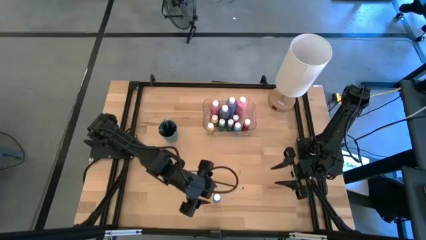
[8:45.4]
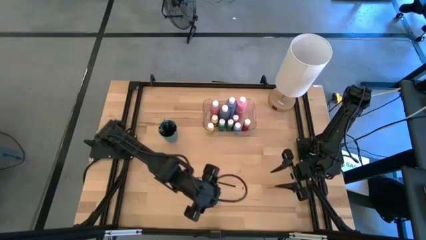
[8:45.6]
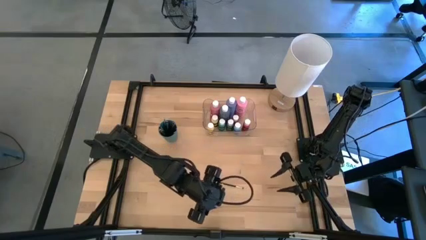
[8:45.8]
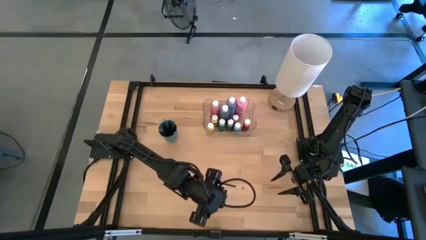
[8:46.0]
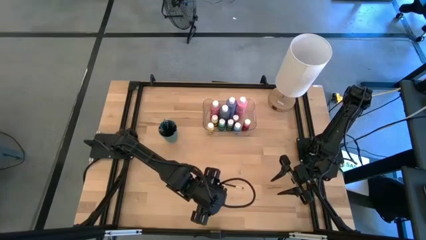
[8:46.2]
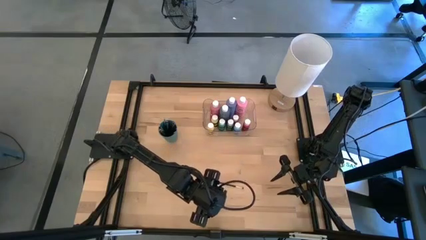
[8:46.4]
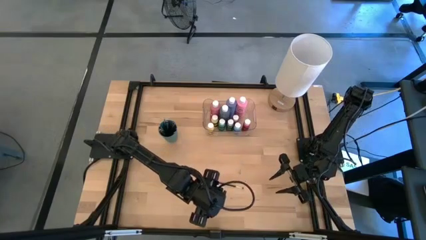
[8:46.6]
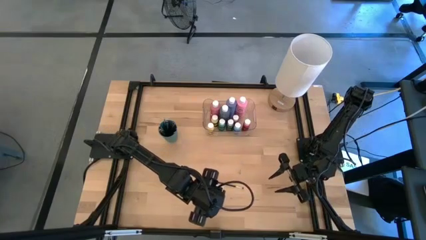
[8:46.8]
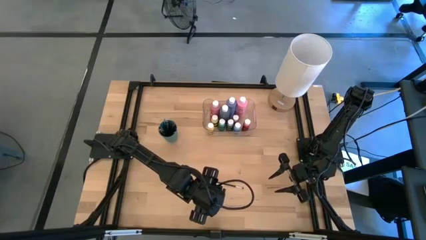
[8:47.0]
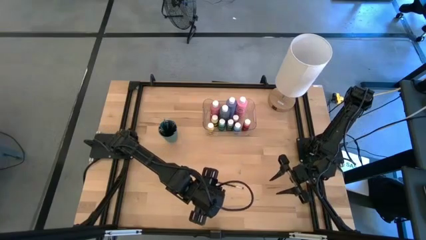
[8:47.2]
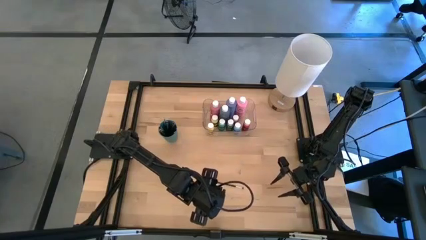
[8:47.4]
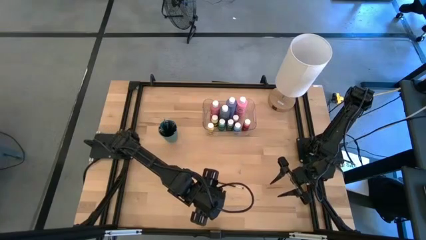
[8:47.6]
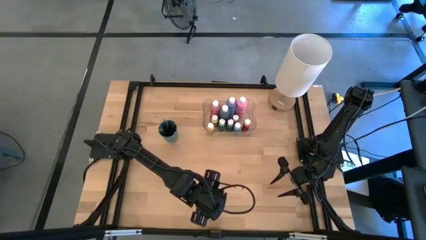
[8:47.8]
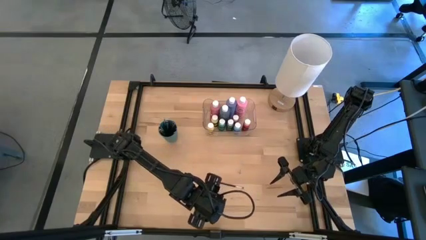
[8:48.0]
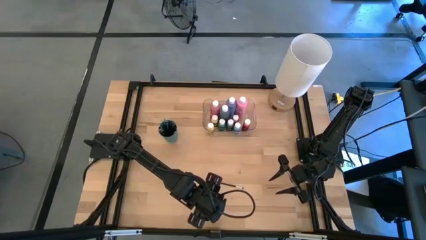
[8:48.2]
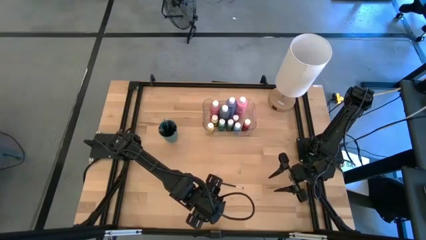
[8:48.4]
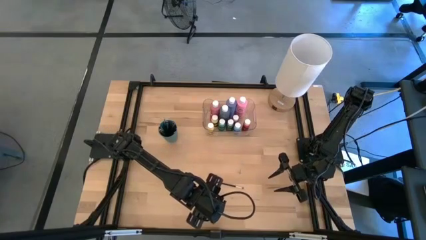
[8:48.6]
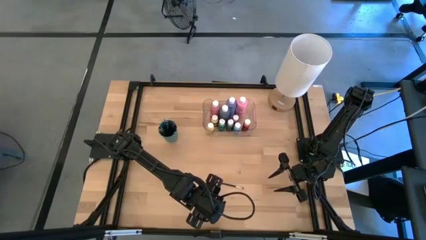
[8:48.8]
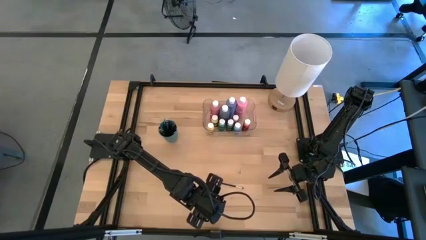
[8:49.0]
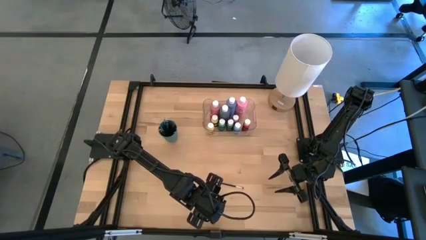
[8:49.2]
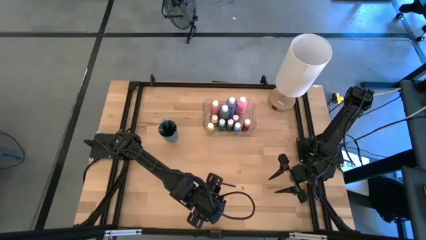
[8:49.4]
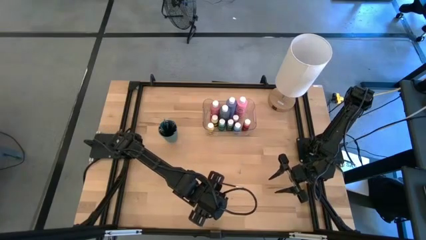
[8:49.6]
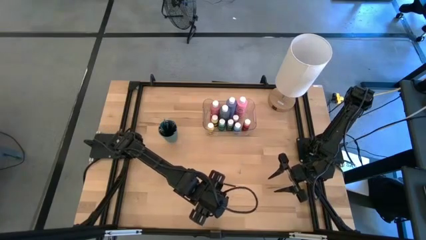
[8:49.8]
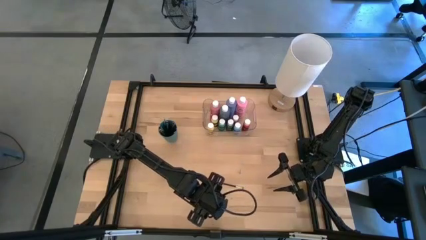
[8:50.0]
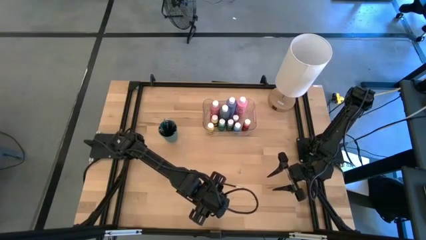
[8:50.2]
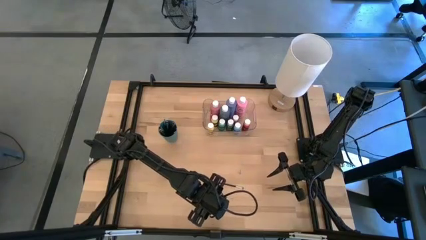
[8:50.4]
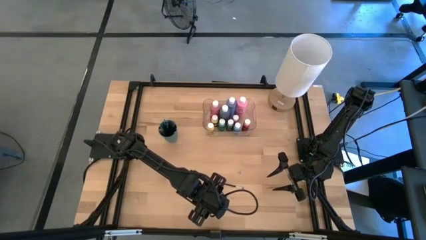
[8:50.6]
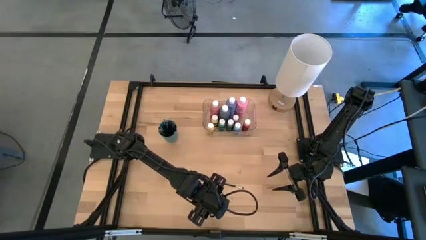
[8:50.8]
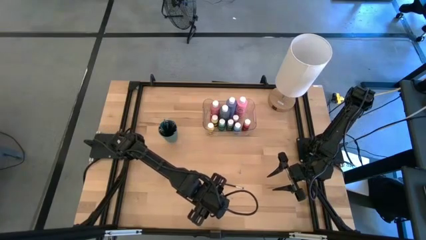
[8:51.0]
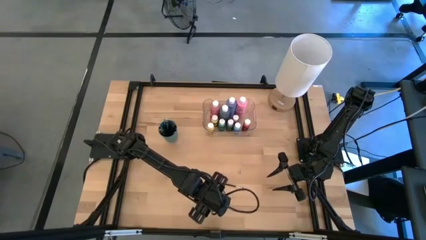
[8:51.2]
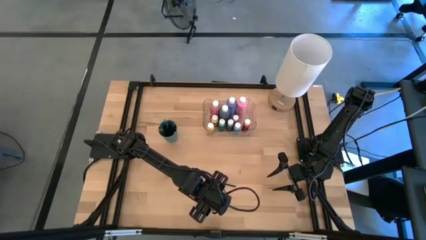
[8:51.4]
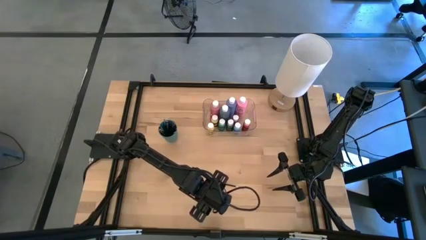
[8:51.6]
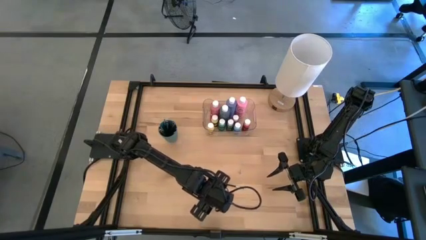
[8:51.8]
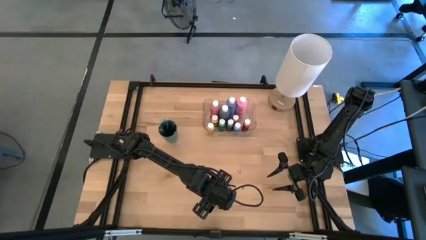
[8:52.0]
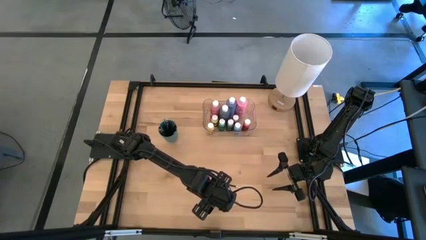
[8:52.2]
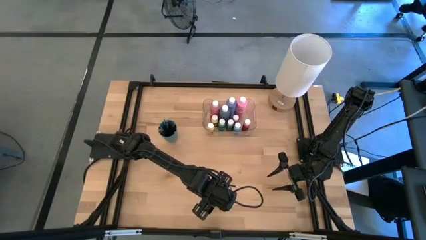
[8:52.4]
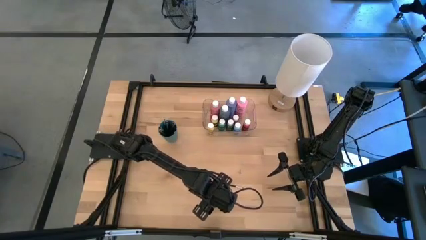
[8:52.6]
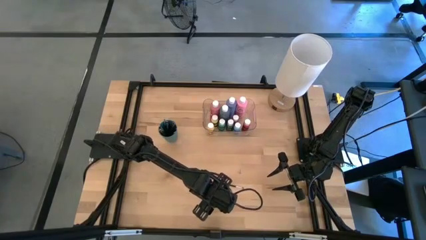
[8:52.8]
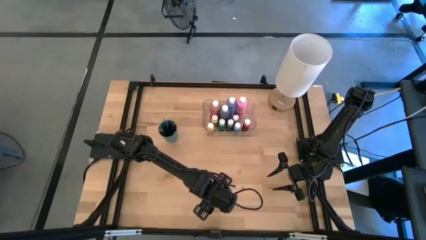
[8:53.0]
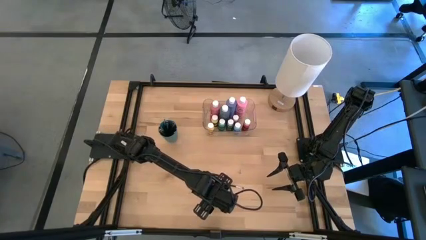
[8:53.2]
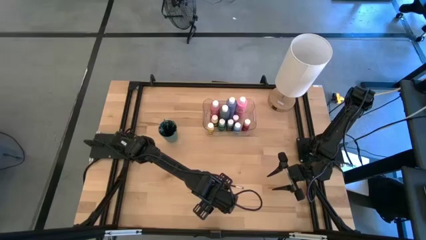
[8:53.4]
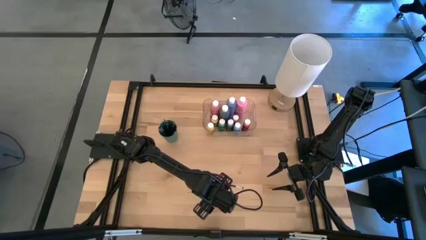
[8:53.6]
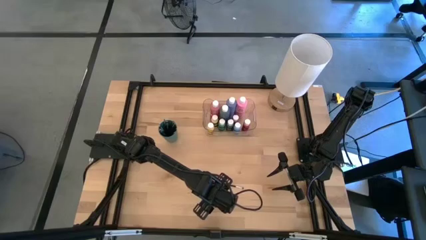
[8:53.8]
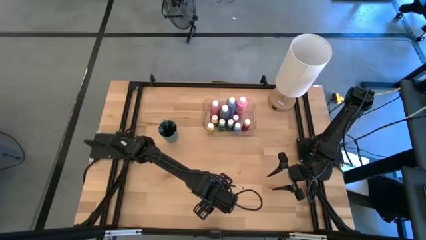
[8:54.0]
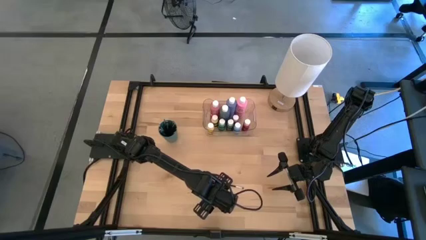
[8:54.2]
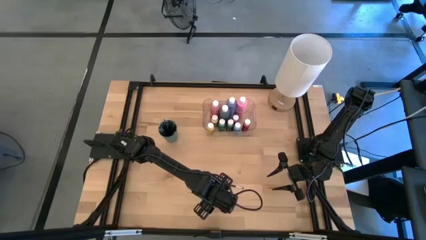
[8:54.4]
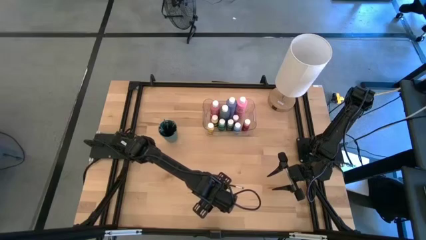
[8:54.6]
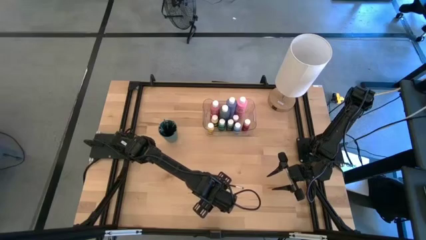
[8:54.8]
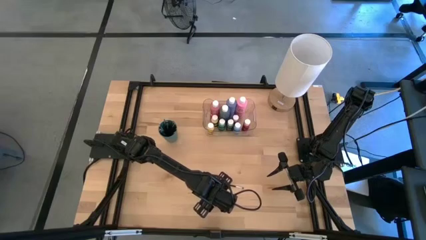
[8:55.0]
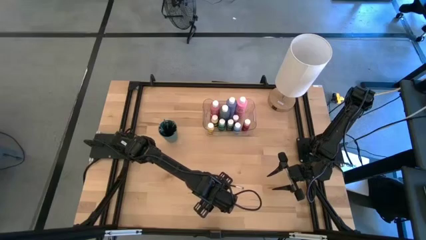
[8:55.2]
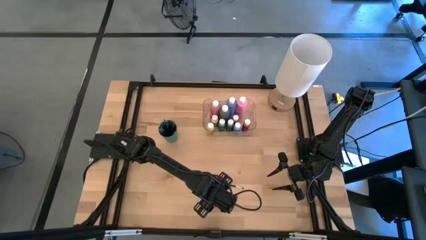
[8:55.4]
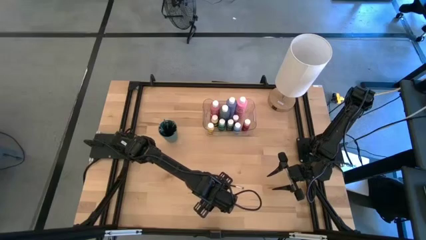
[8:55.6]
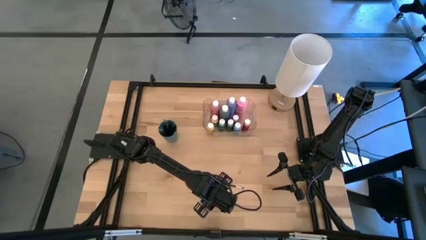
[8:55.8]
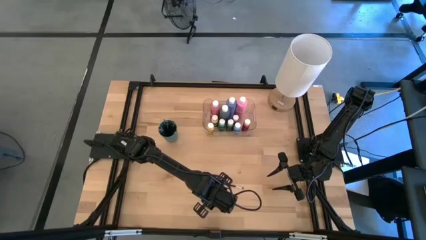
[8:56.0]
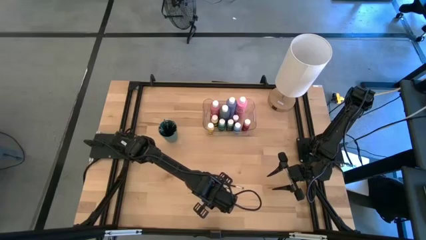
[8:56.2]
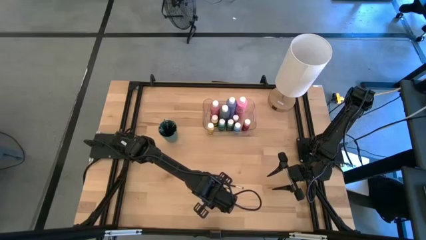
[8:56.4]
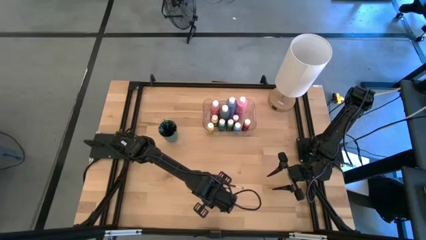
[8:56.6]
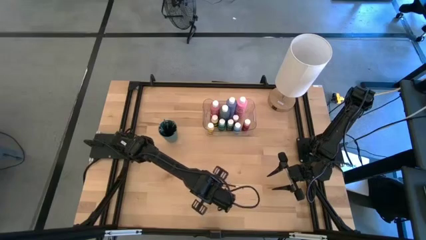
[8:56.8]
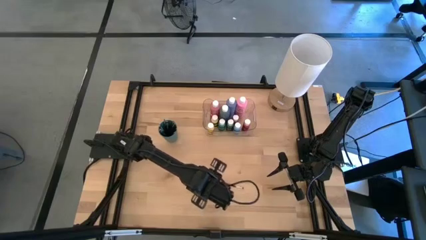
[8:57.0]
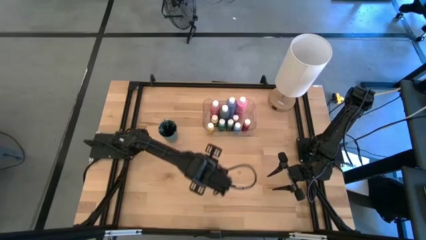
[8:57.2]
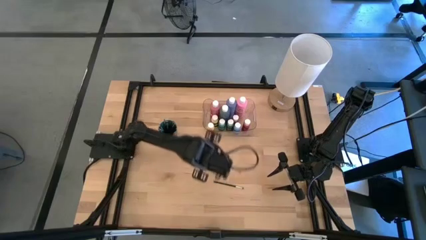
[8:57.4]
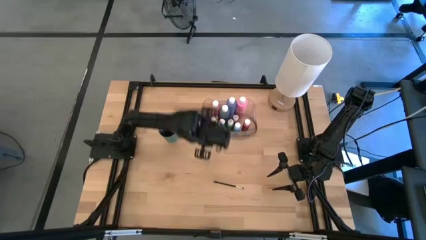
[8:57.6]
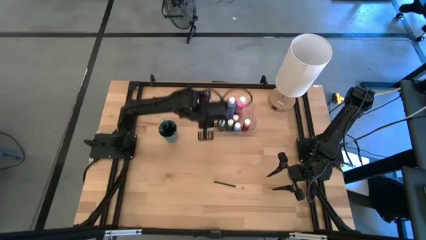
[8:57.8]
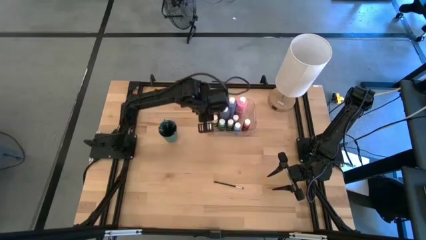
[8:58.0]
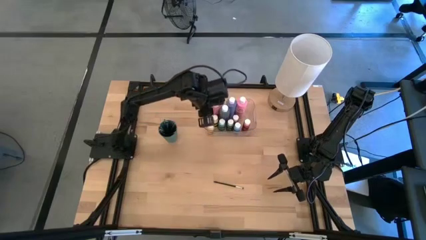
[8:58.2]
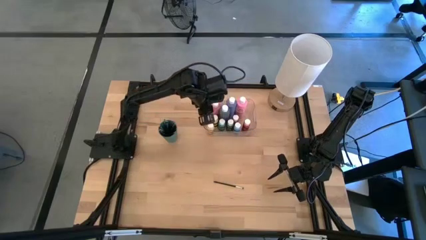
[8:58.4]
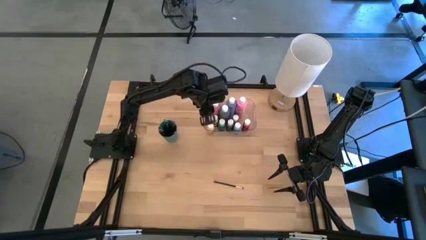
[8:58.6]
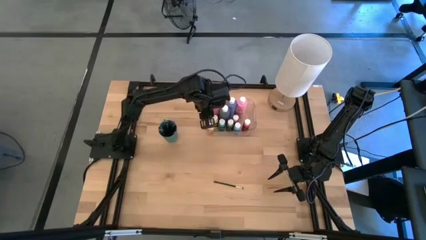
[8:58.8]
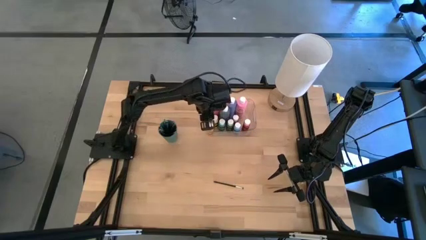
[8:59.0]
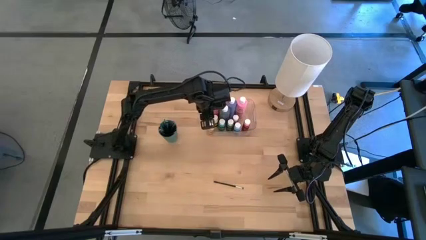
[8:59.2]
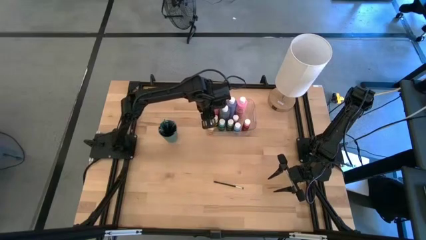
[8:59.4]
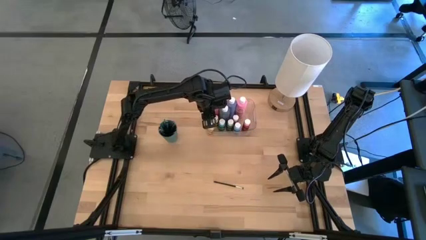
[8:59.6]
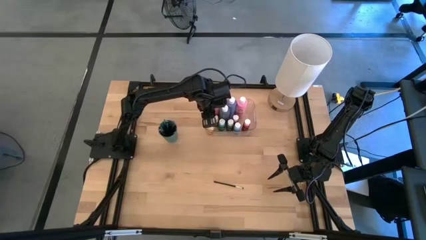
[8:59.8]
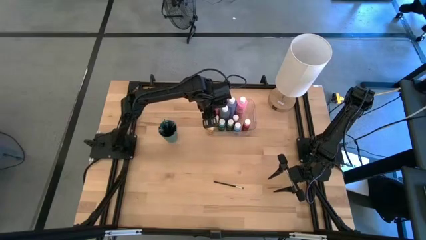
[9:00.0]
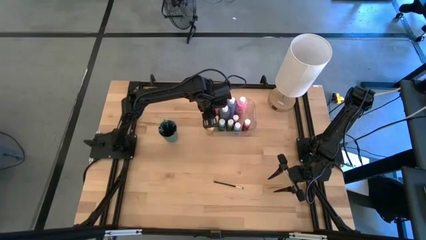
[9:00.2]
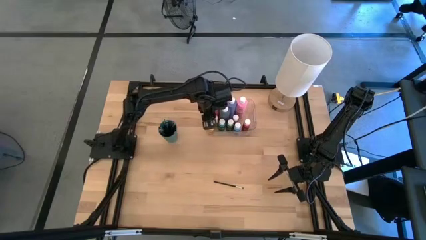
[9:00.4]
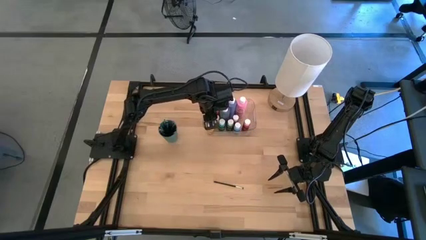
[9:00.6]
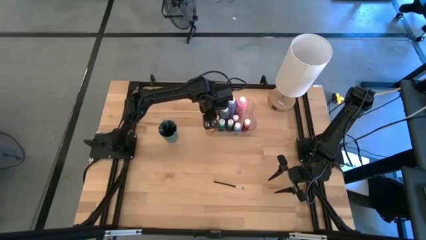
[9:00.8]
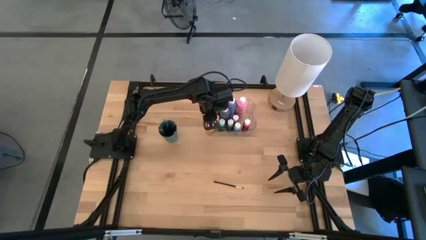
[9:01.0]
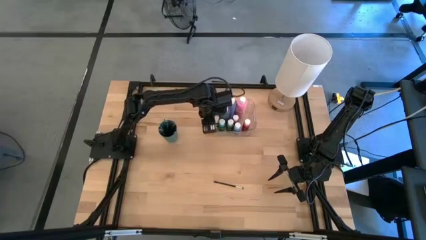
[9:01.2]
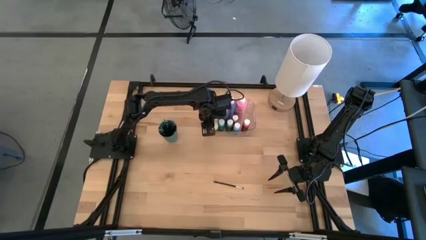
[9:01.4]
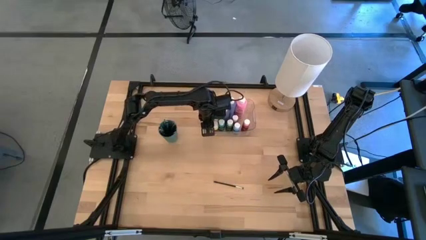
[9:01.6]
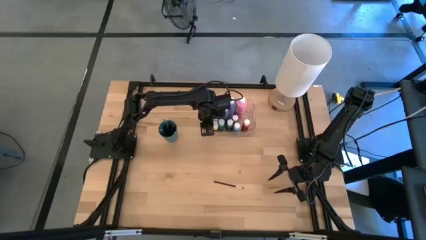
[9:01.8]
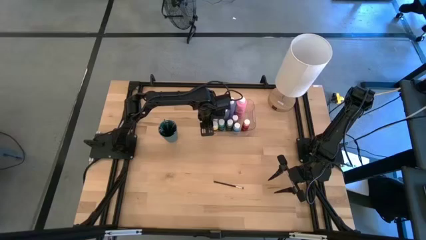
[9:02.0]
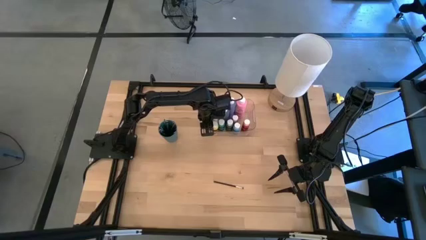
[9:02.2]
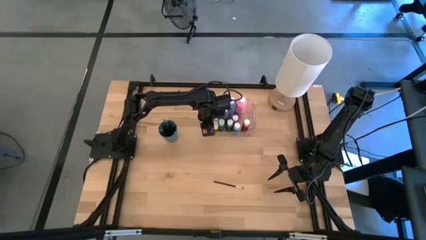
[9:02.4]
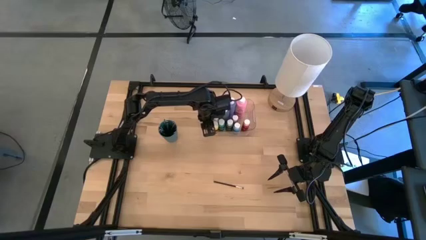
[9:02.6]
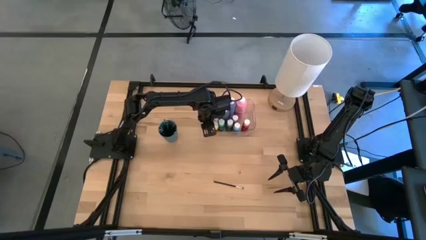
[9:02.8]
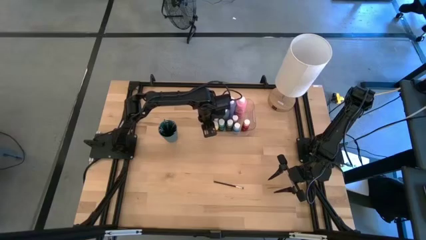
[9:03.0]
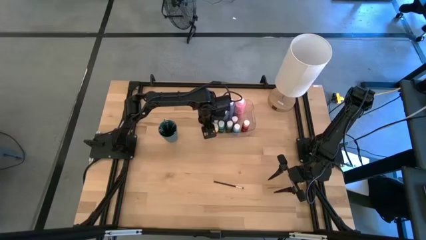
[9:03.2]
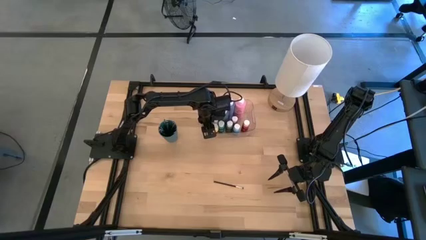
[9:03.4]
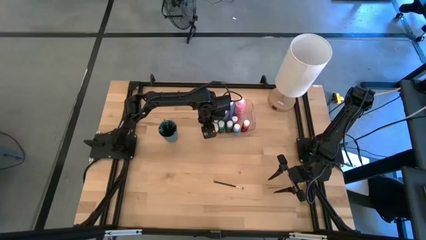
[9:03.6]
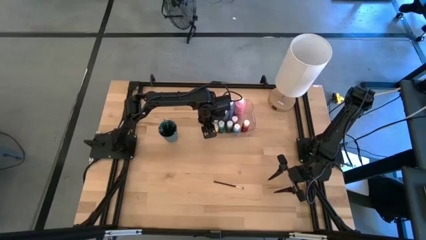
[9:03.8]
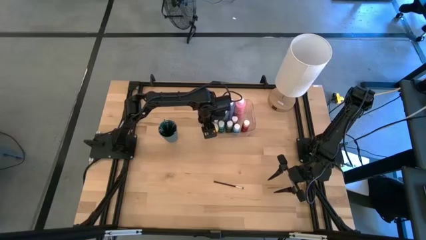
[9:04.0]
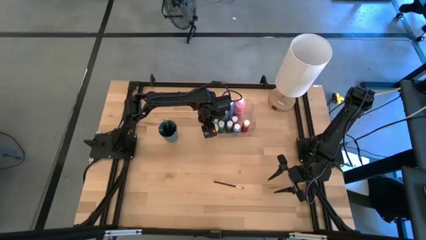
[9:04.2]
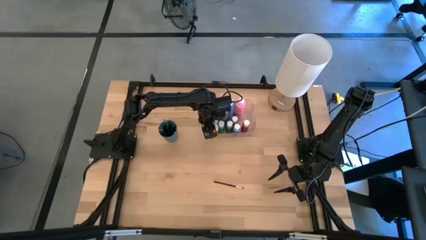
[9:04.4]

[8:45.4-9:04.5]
Task: Pick & Place Paint Supplies
Put the blue paint bottle into the transparent bin
